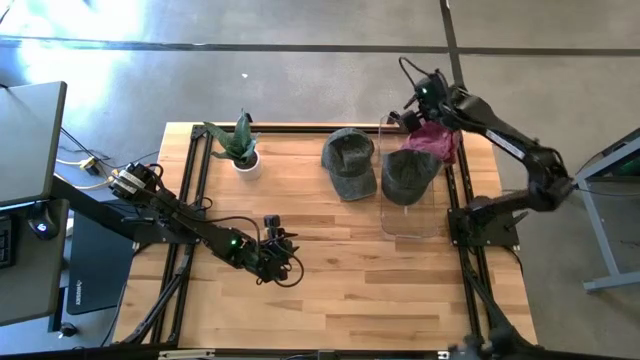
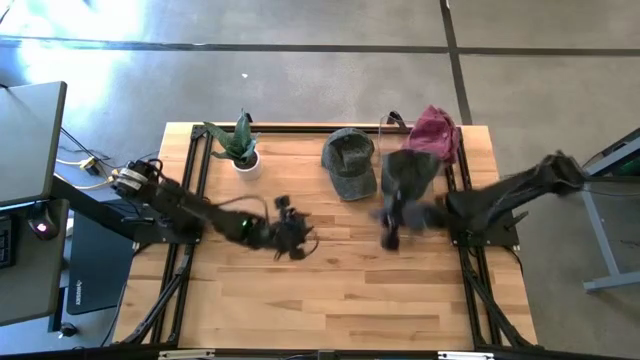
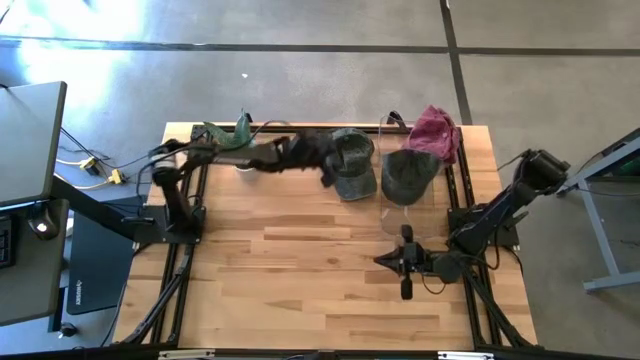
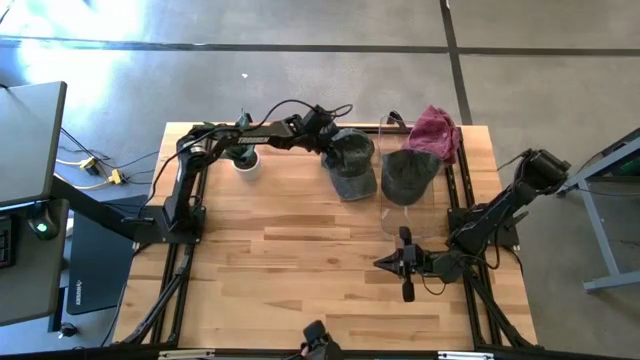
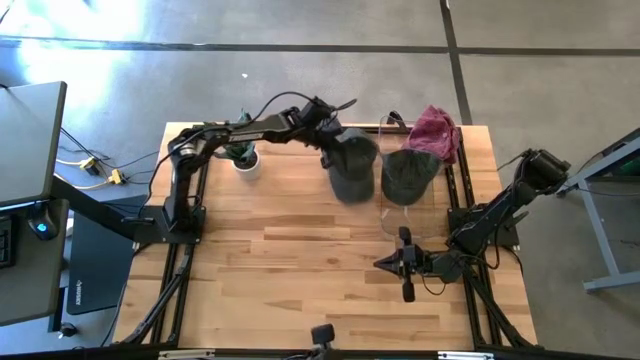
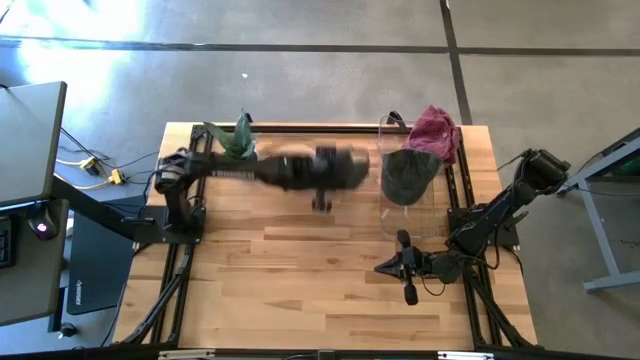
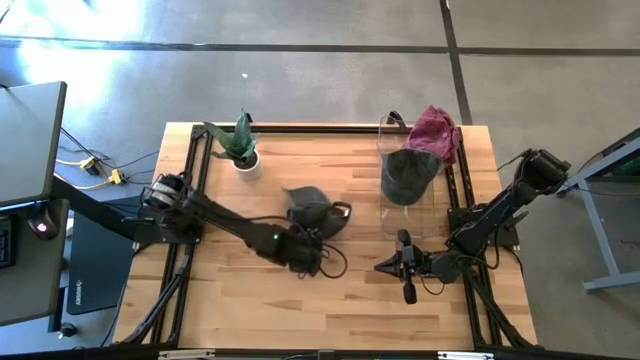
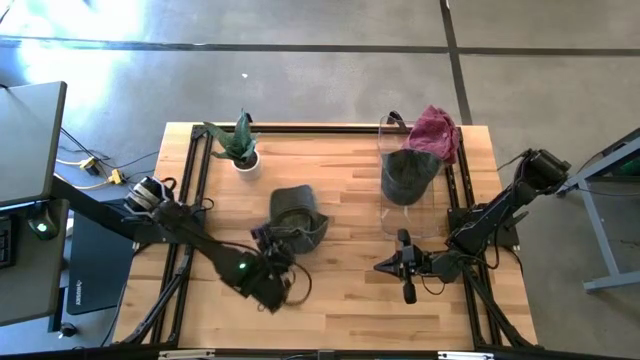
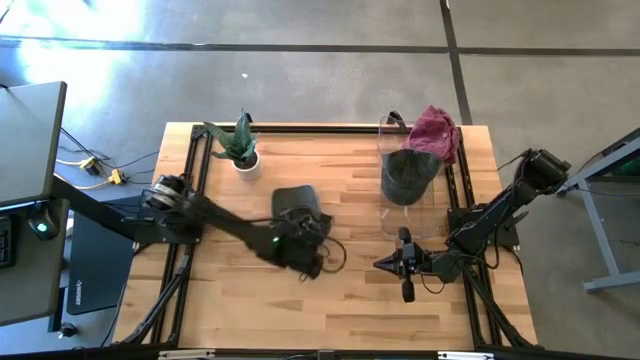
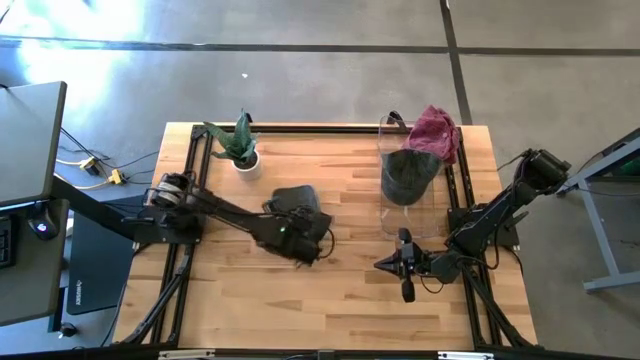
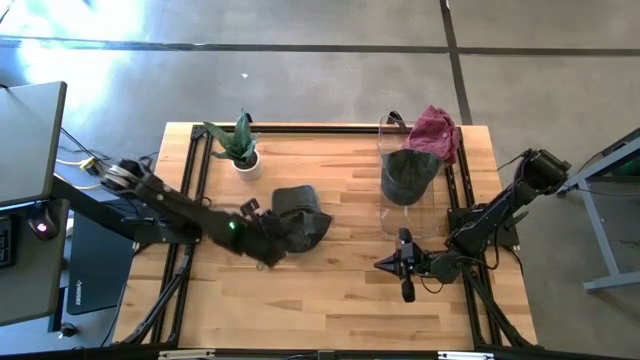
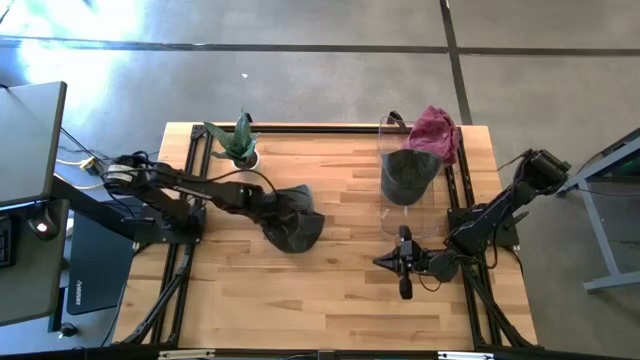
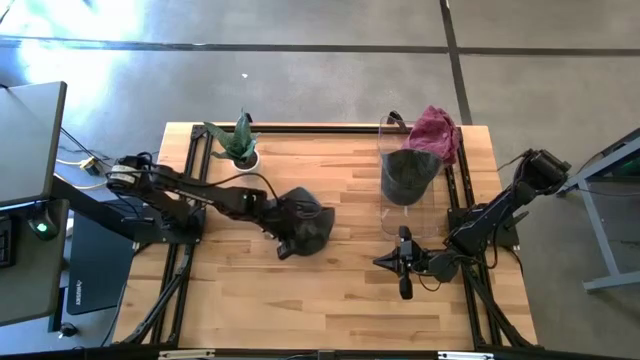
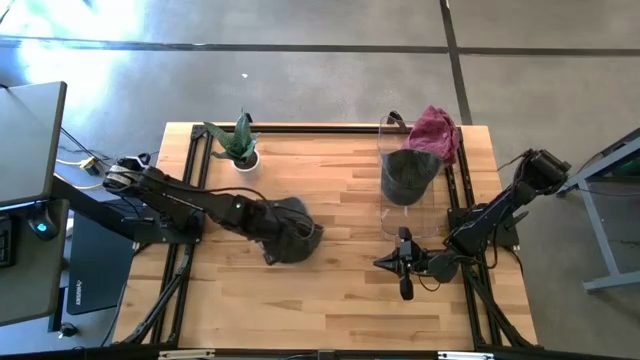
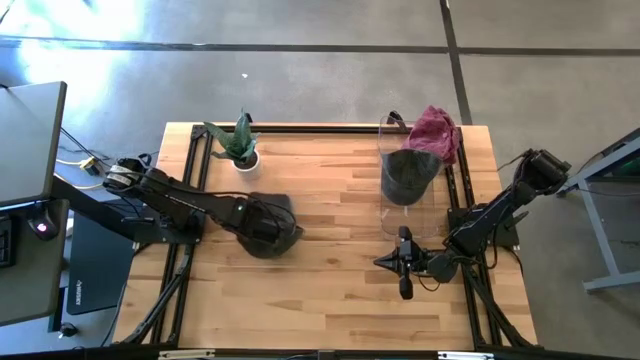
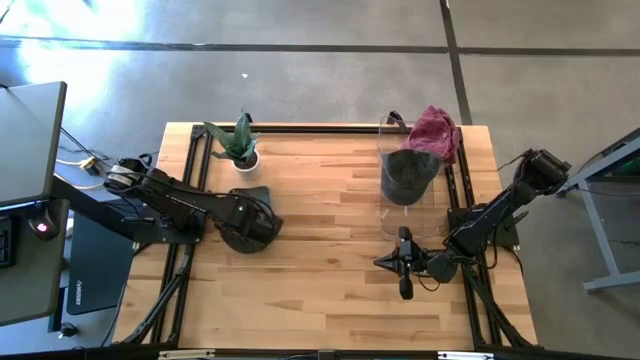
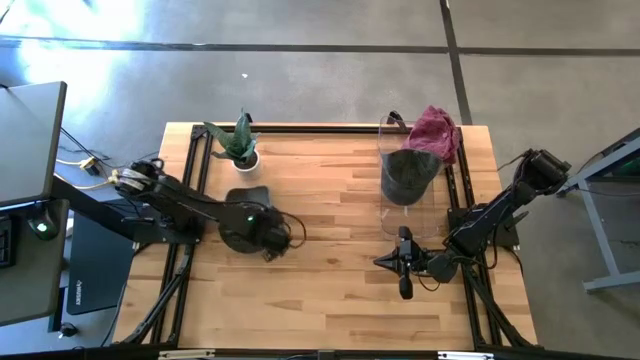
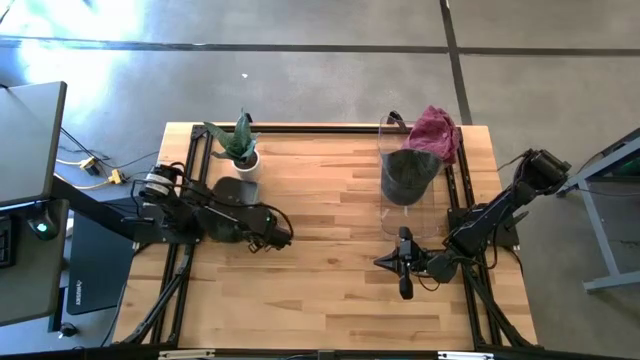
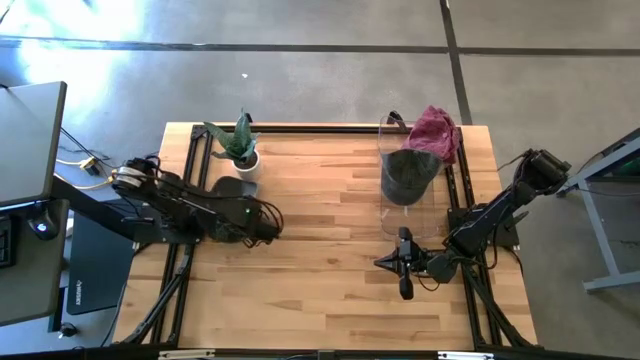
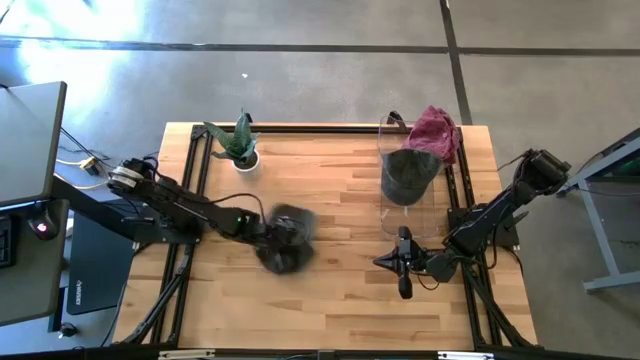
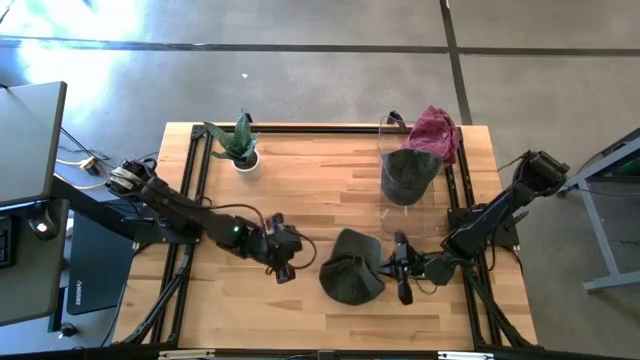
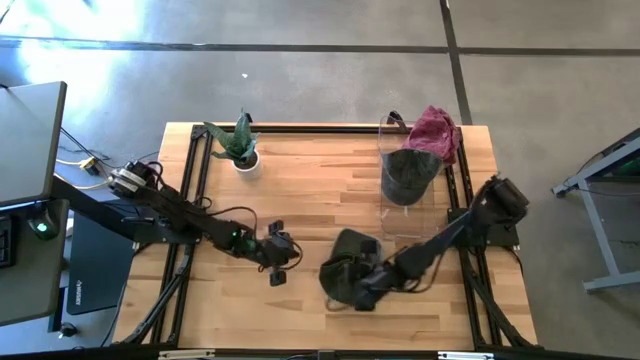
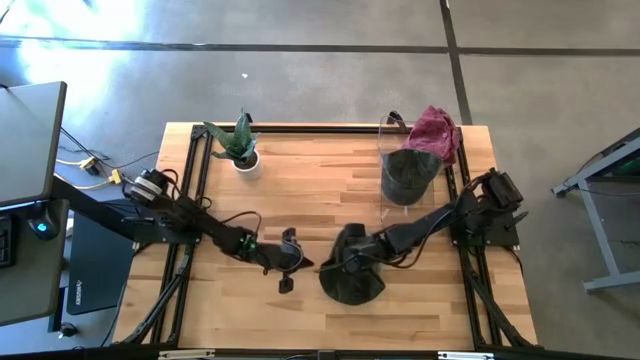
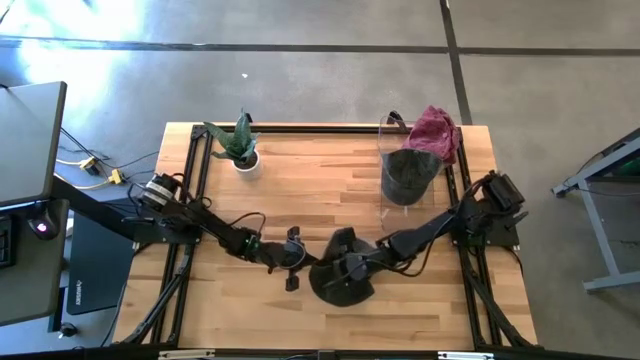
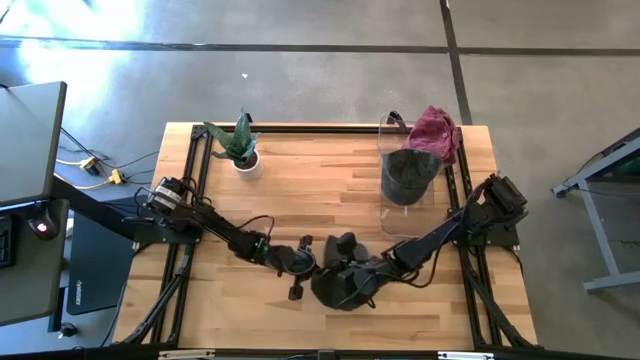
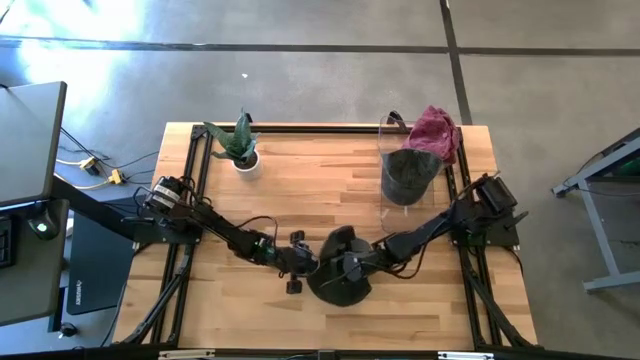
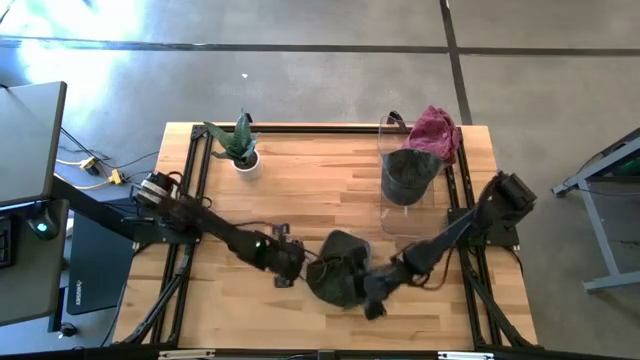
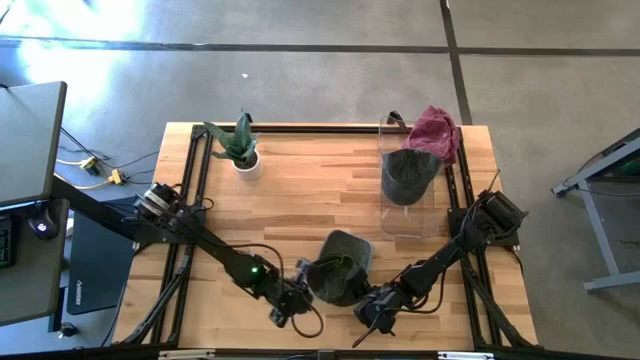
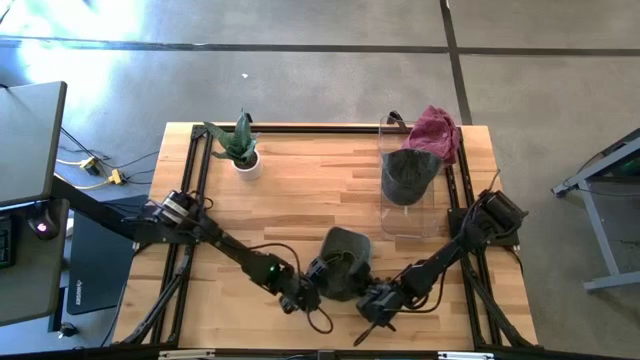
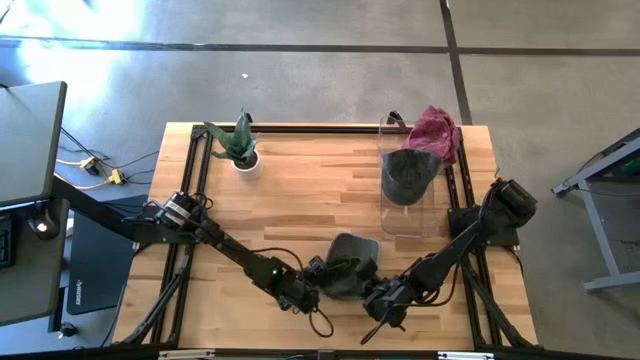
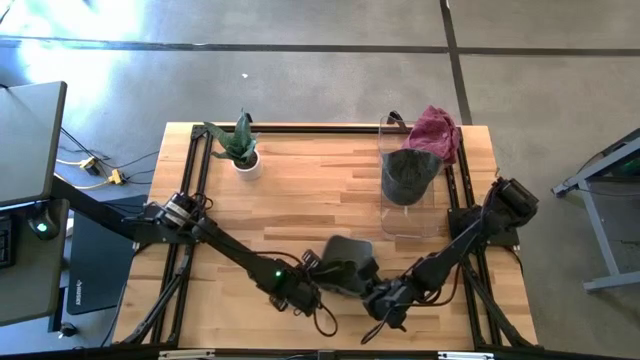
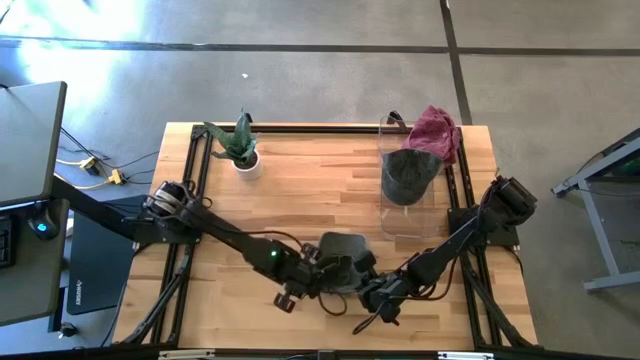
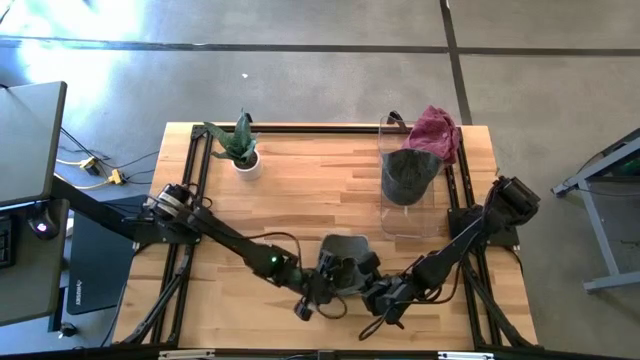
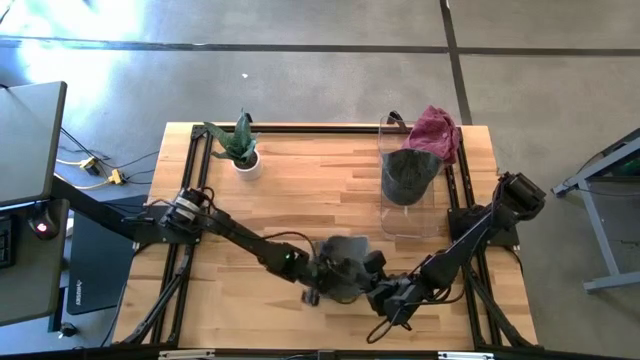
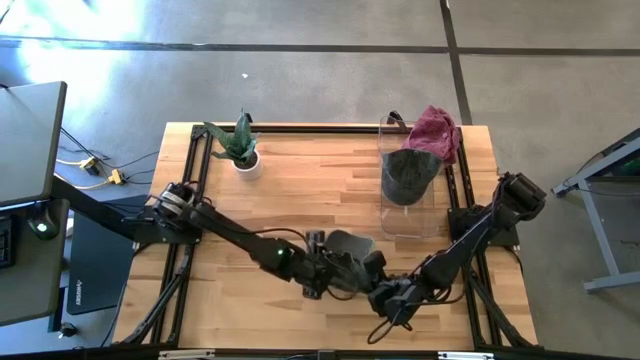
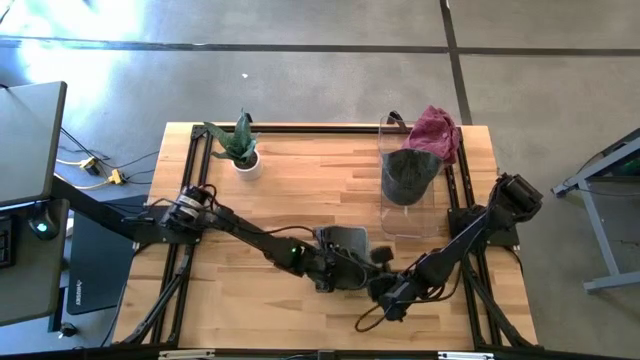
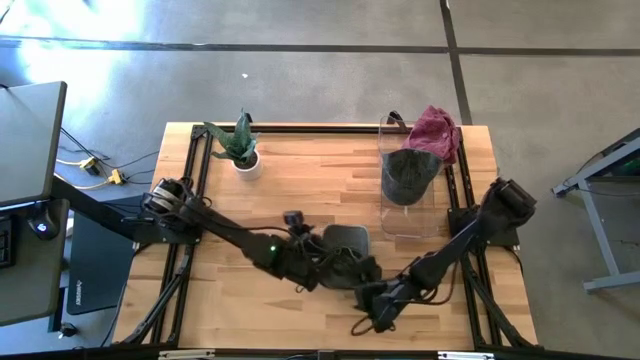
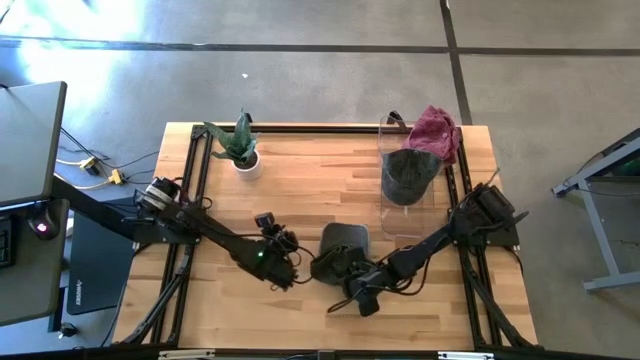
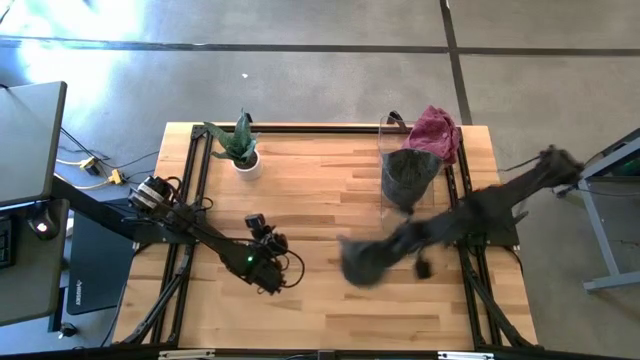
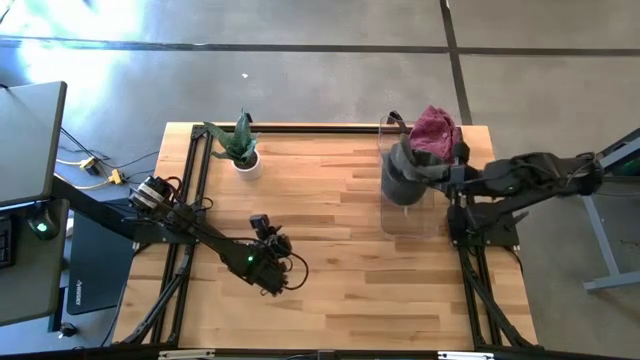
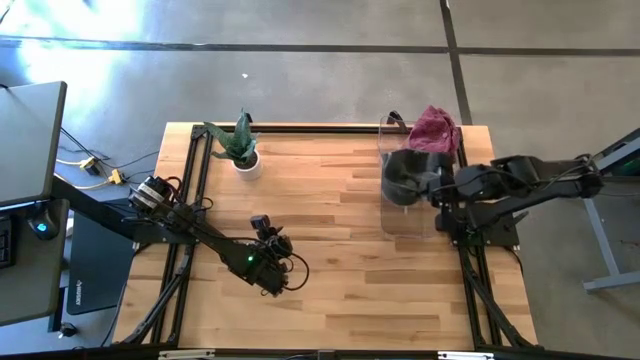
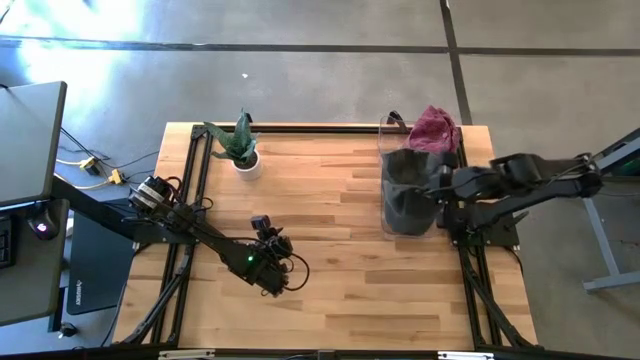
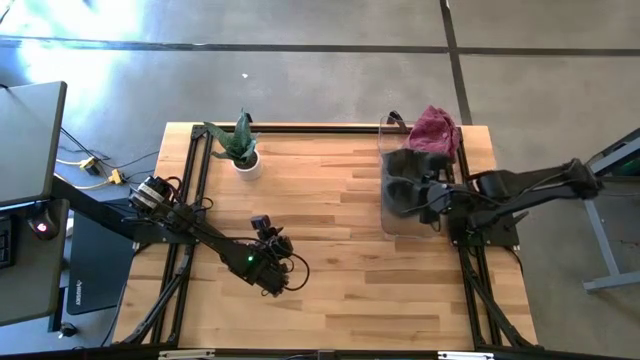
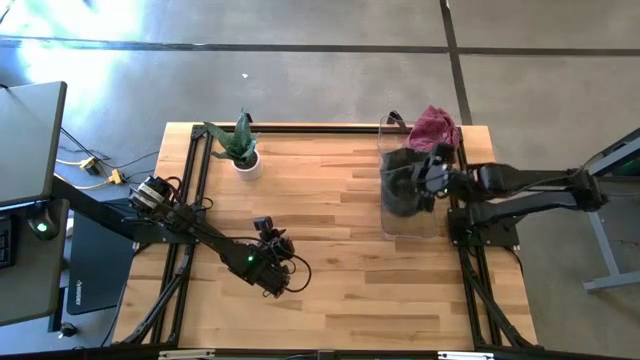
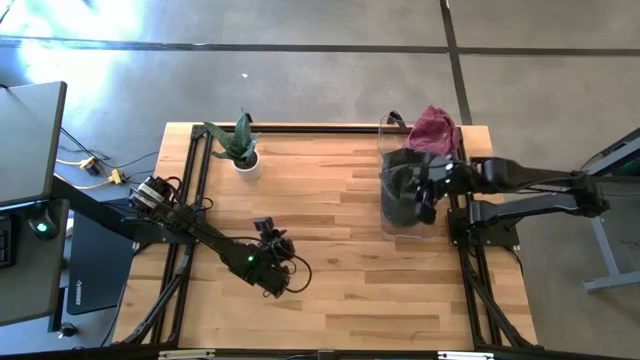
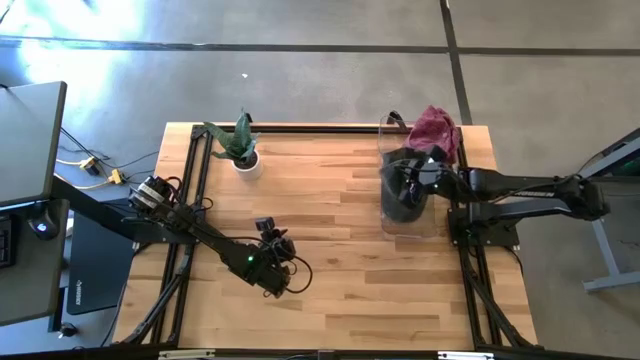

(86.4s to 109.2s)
Task: Pick & Place hat
Put the gray cap into the bottom transparent bin
